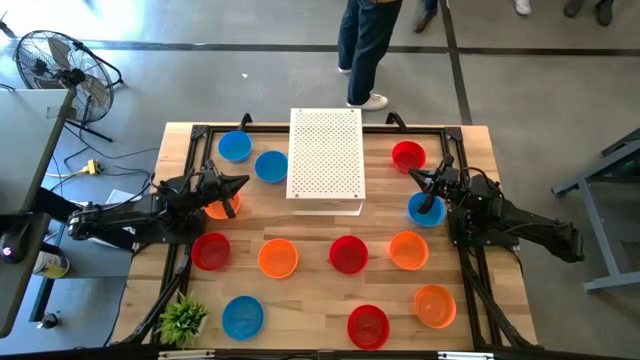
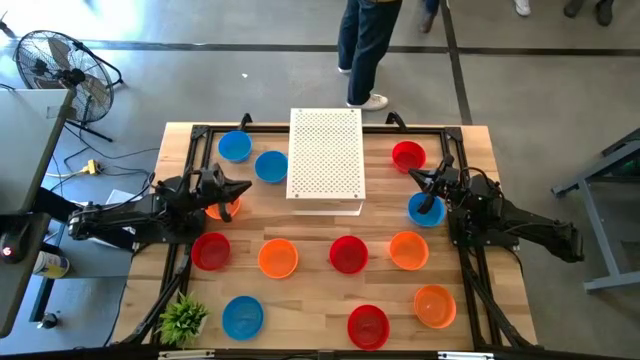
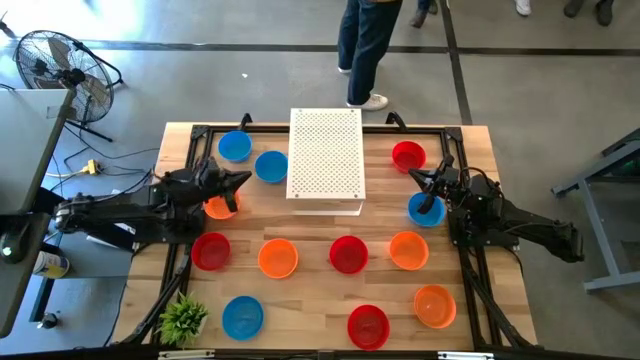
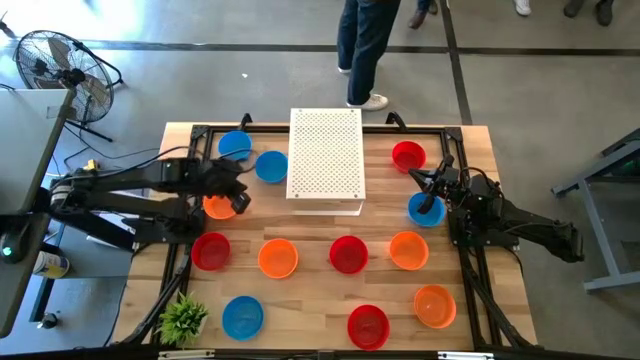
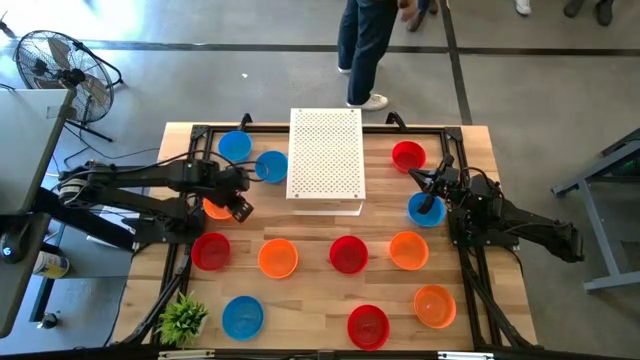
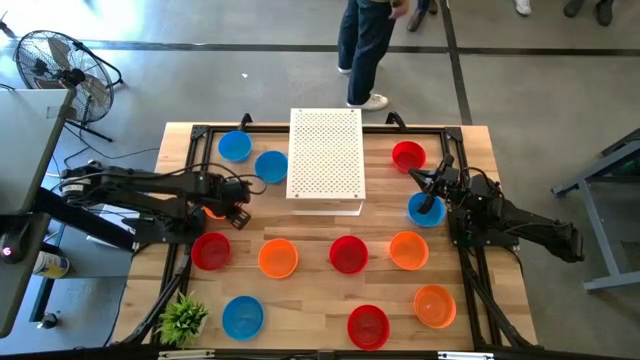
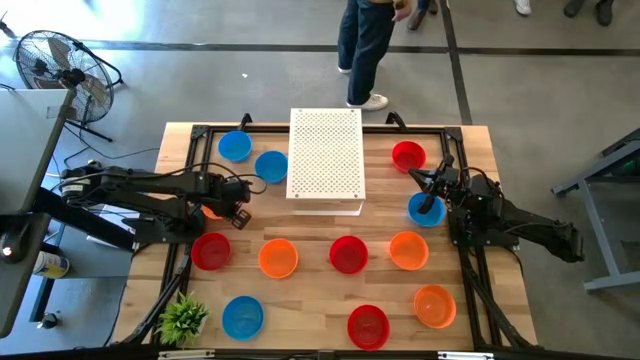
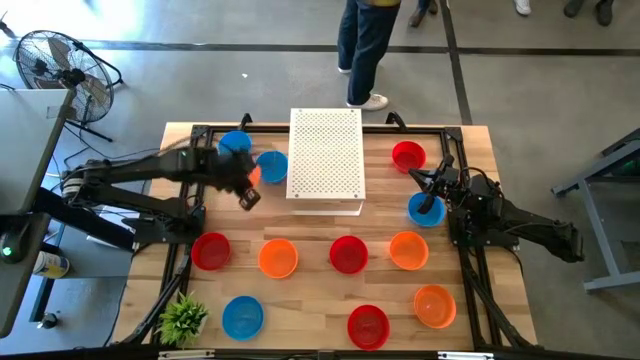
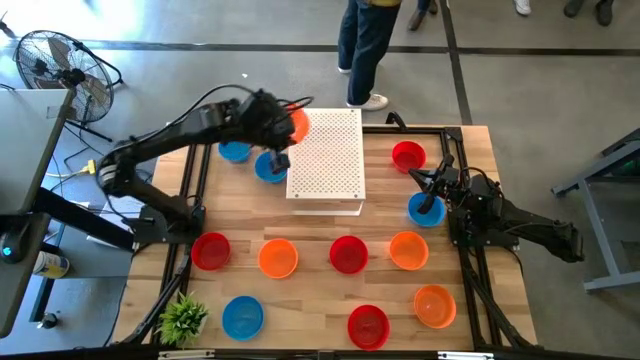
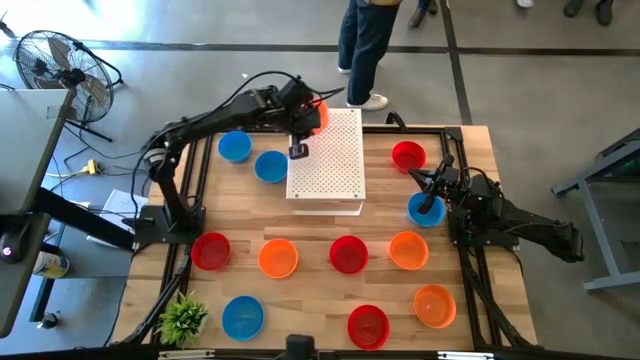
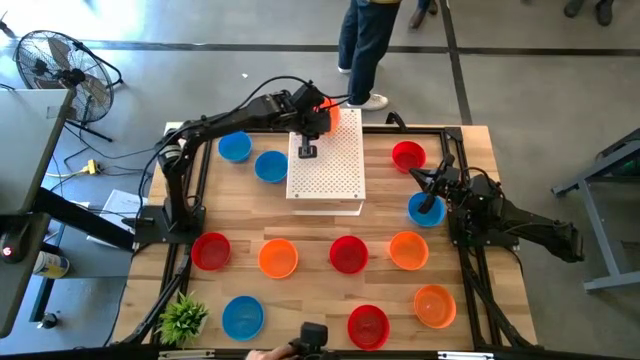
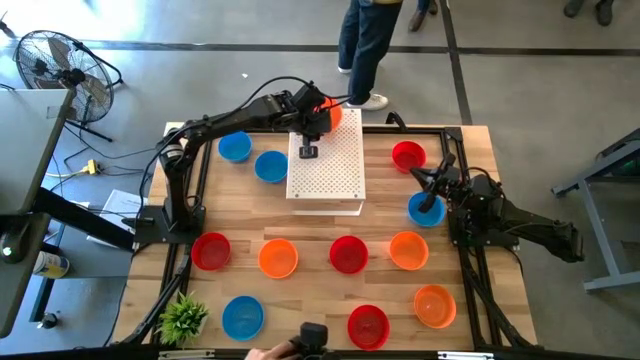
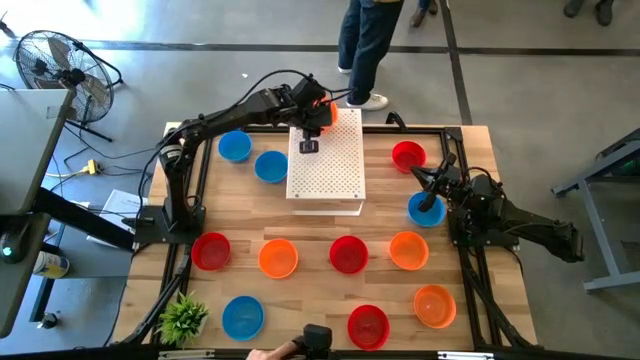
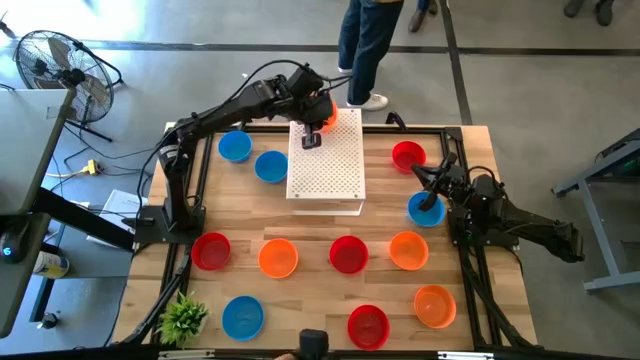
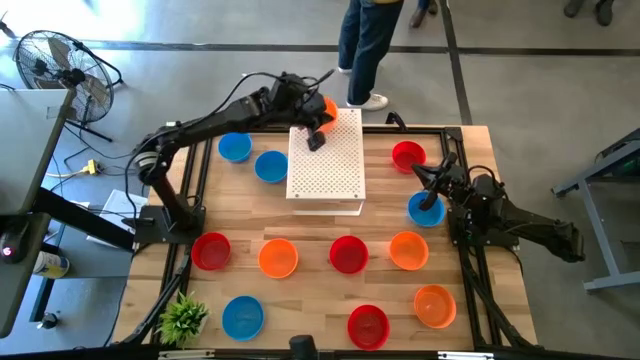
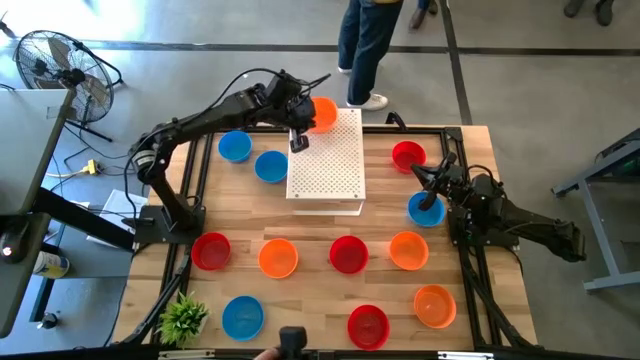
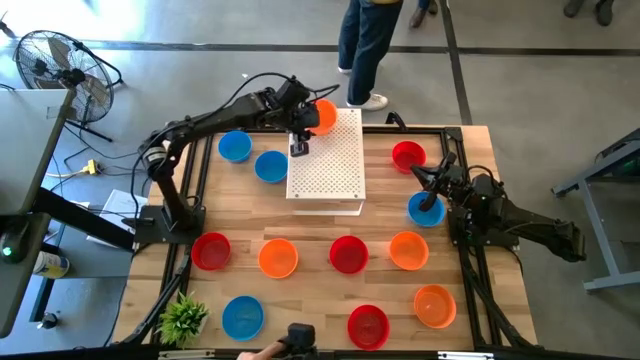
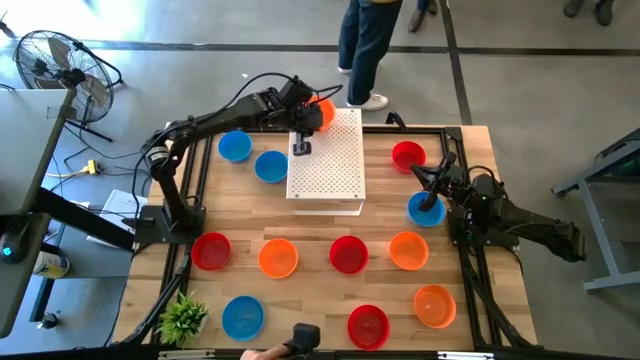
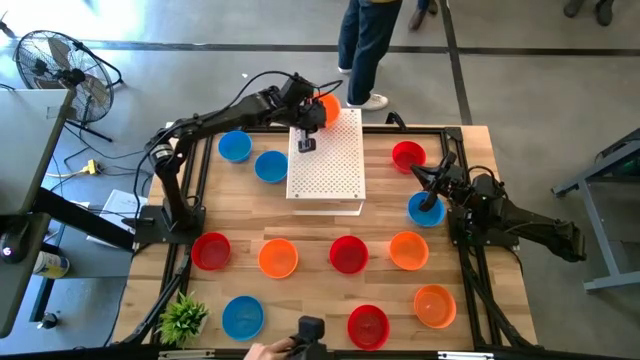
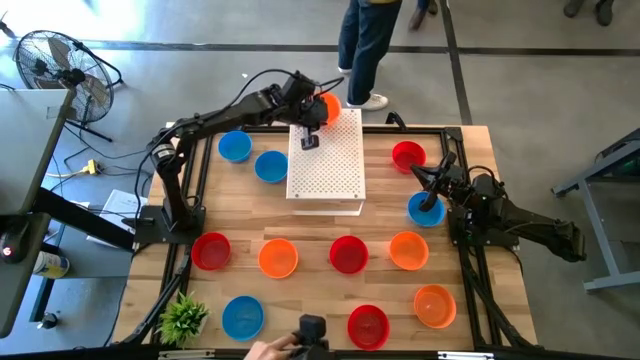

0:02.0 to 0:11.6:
Task: Pick & Place Mini bowls
Put the orange bowl on the shelf

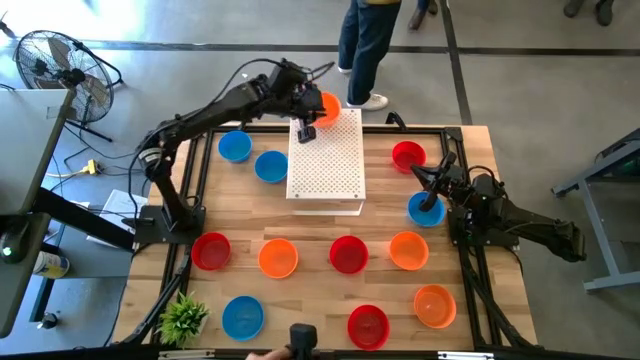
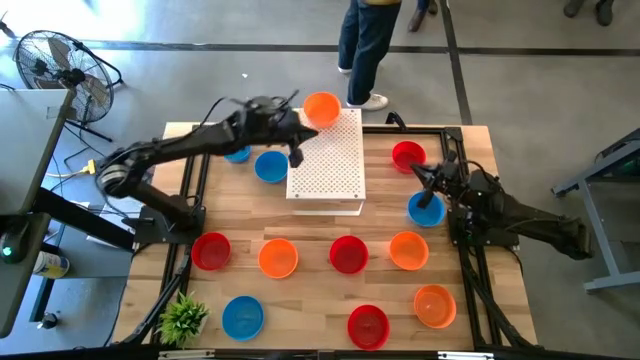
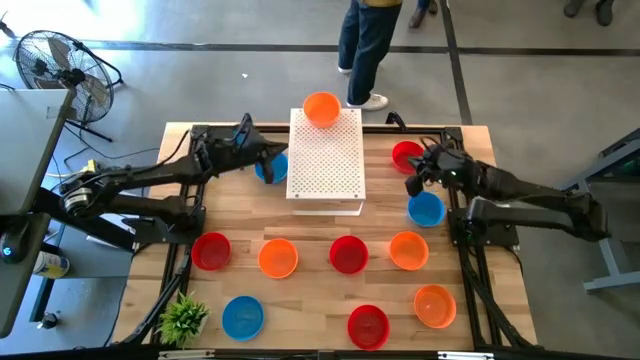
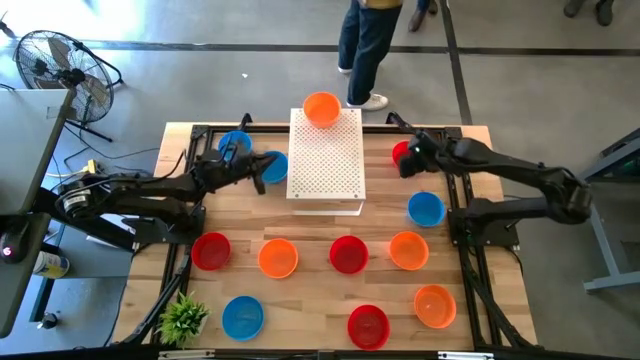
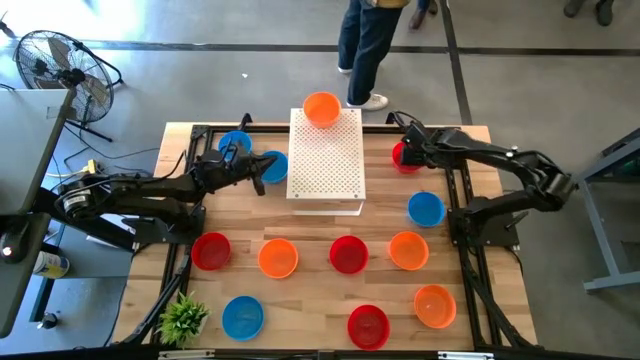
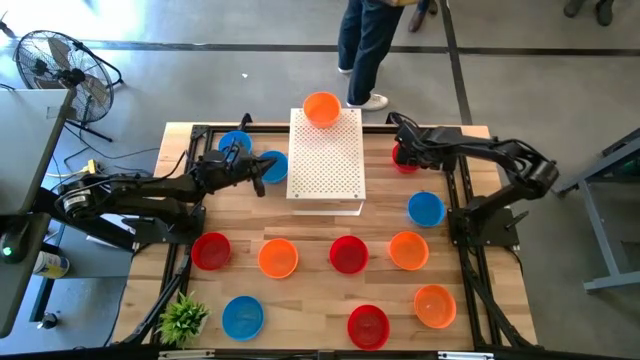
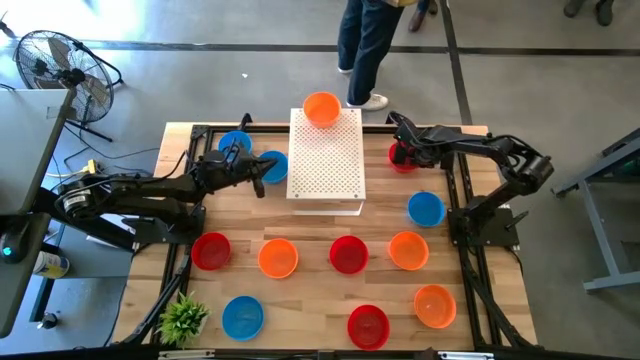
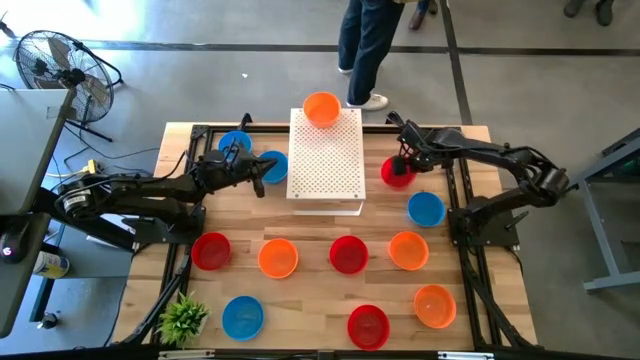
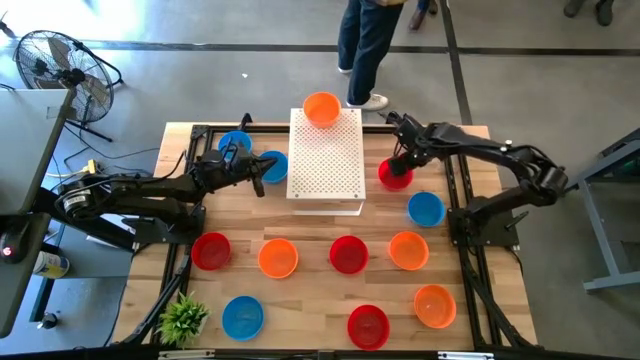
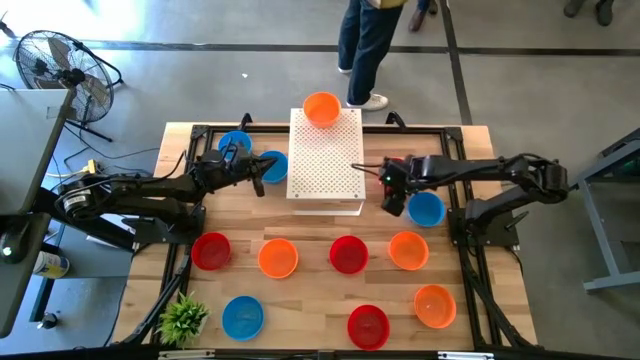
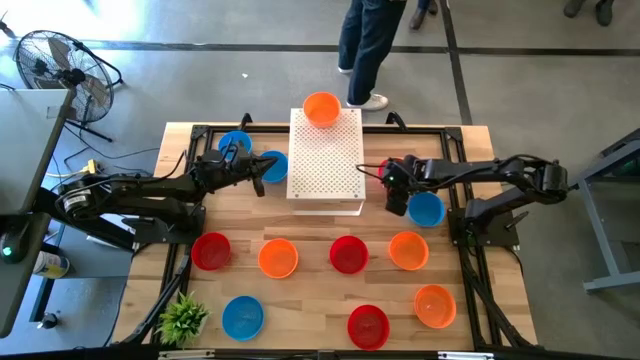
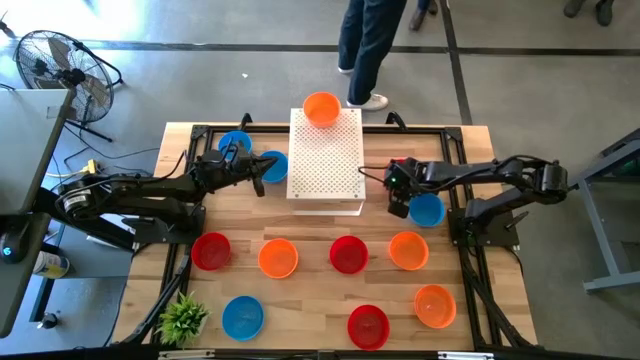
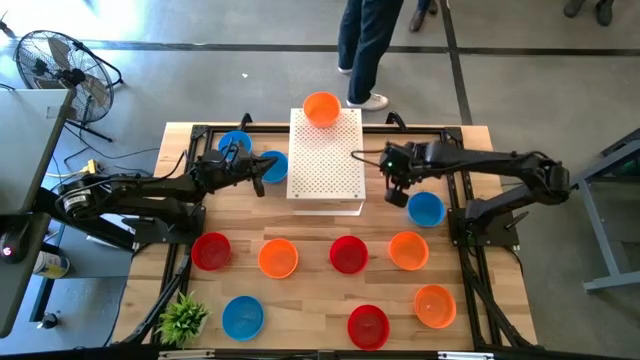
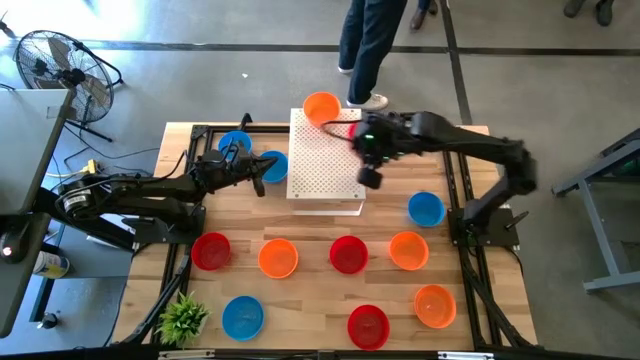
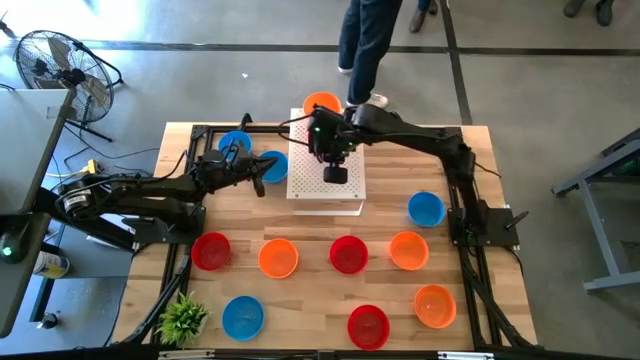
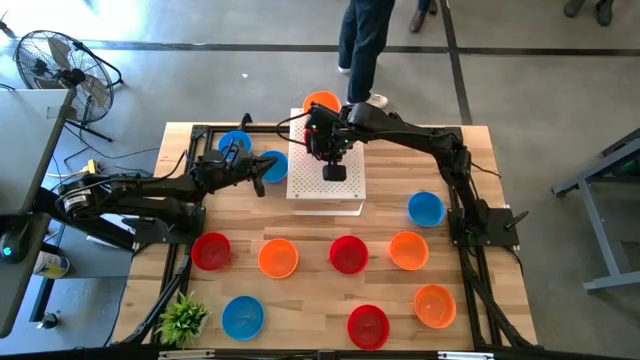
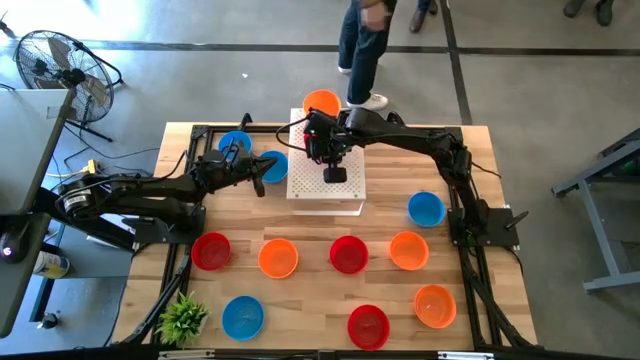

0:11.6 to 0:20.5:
Put the red bowl on the shelf

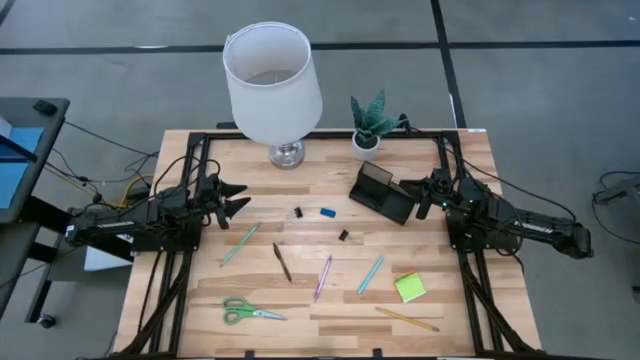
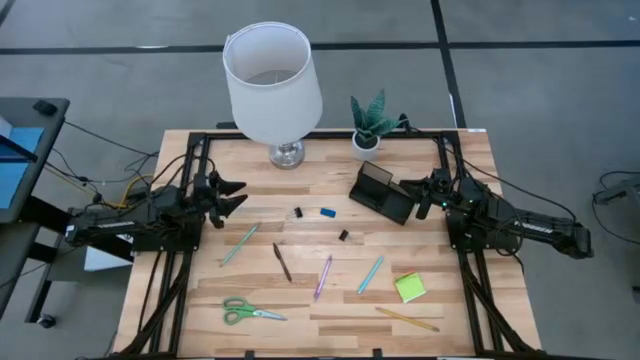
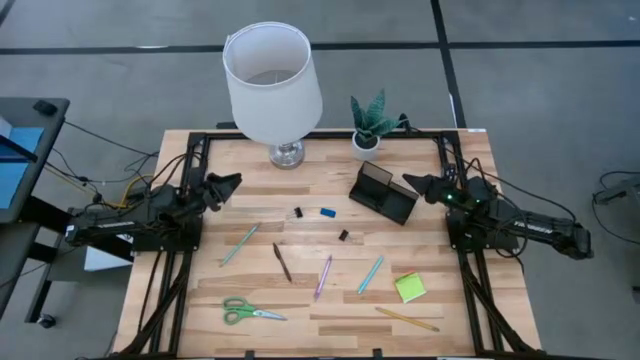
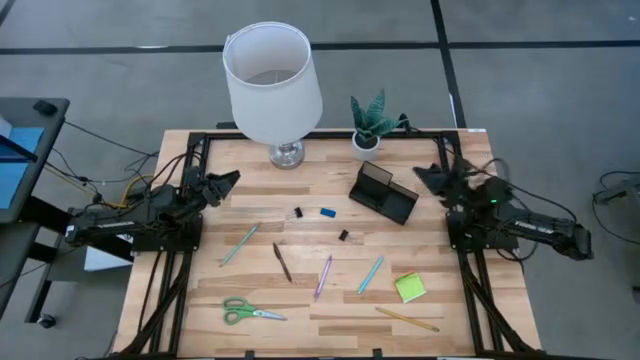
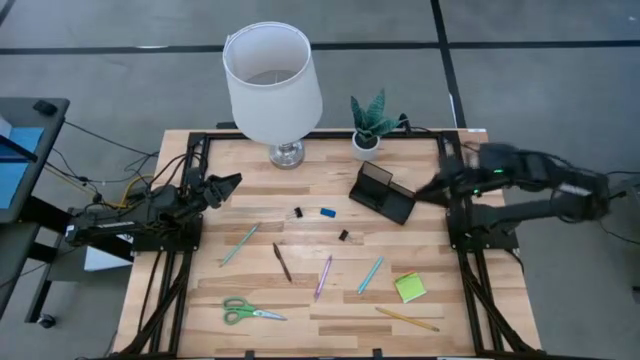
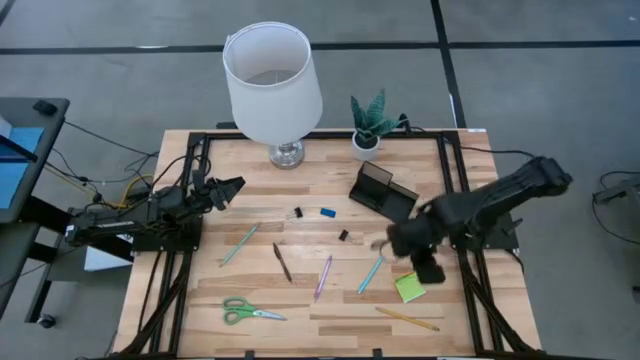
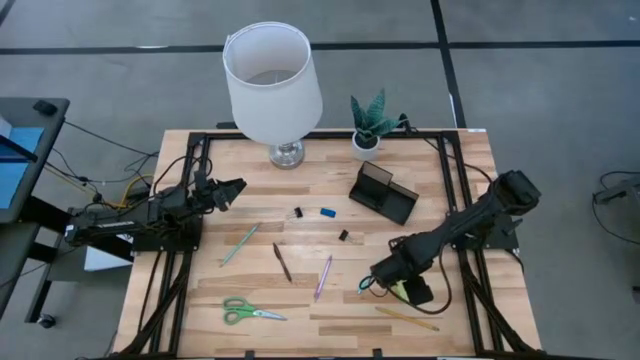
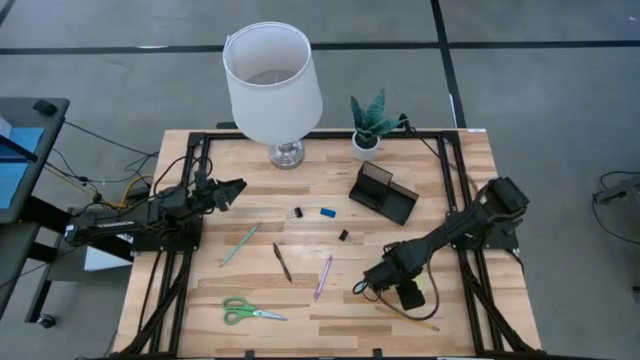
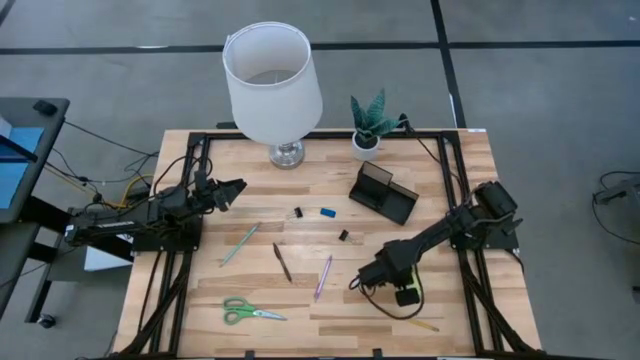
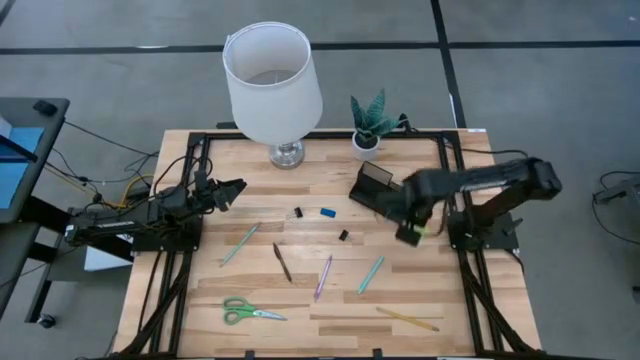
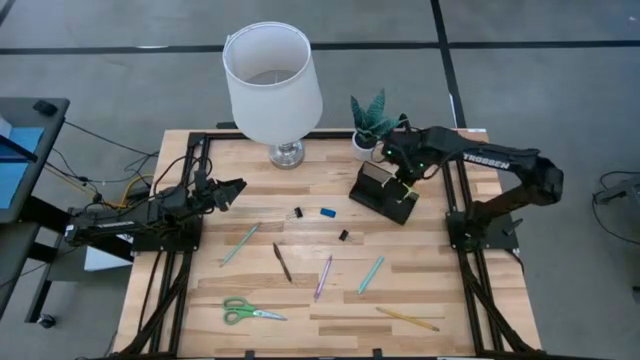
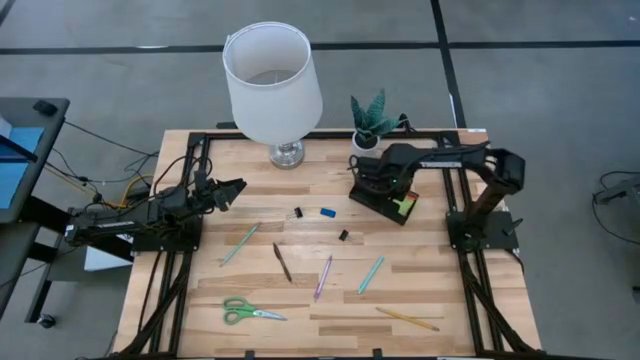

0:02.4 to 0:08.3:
Task: Pick and place office supplies into organizer
Put the green sticky notes into the black organizer
